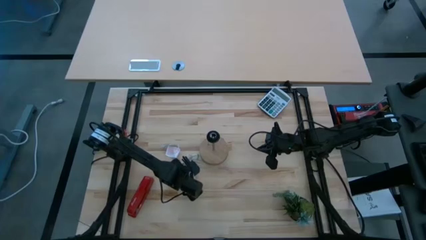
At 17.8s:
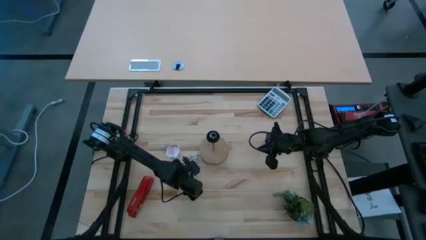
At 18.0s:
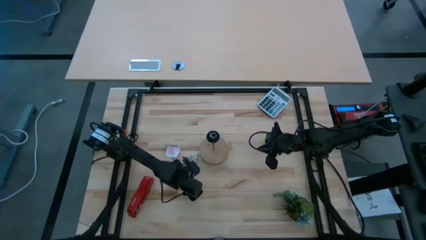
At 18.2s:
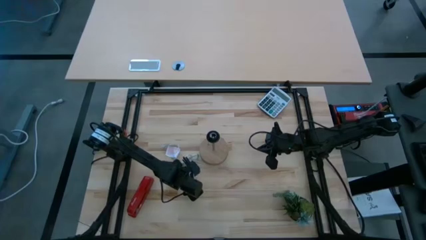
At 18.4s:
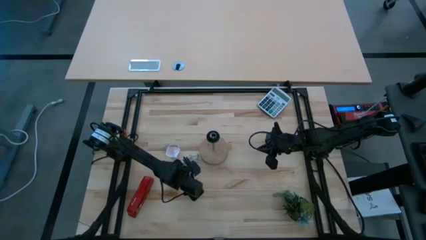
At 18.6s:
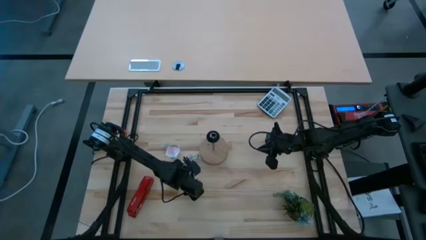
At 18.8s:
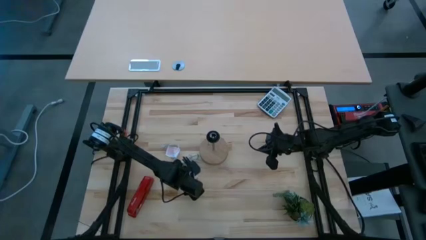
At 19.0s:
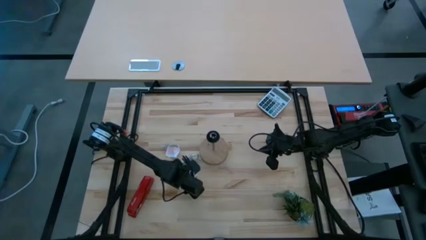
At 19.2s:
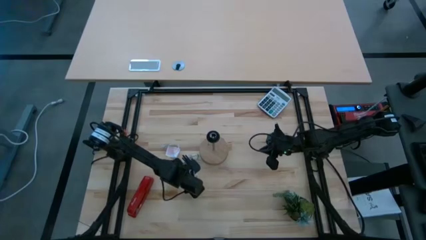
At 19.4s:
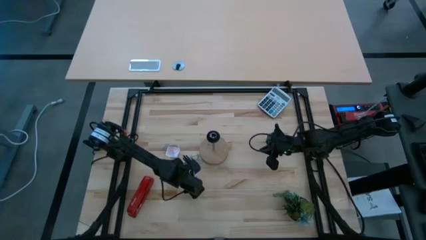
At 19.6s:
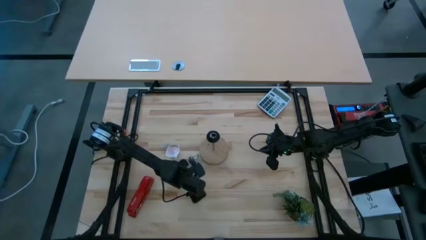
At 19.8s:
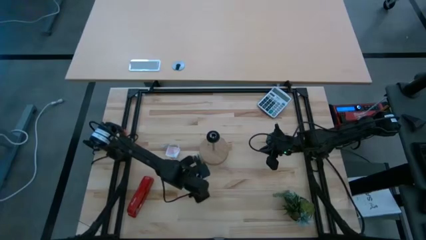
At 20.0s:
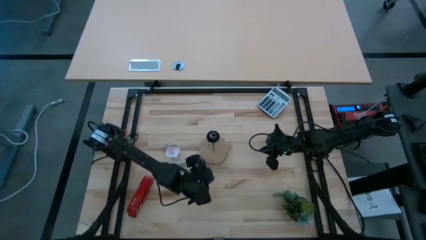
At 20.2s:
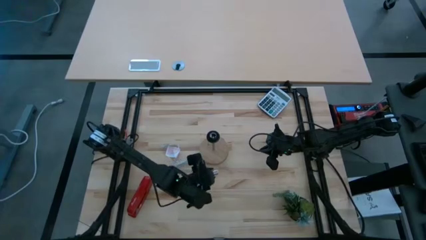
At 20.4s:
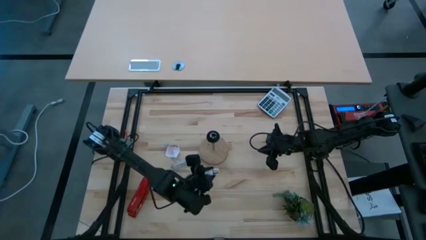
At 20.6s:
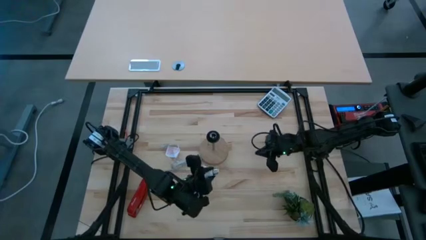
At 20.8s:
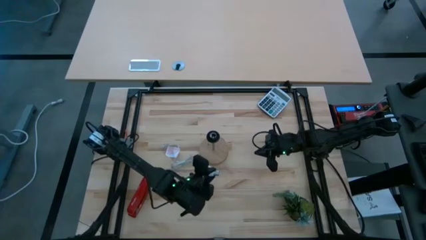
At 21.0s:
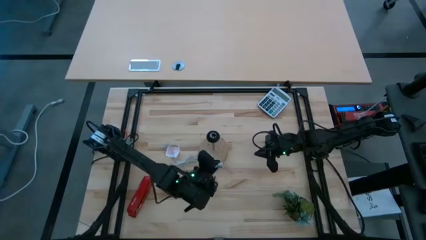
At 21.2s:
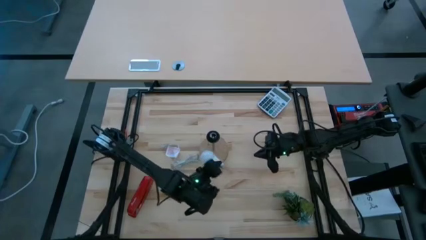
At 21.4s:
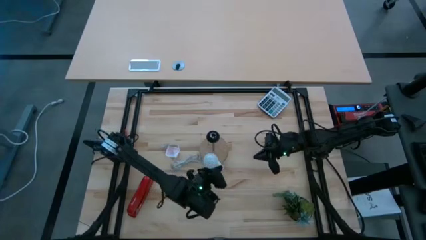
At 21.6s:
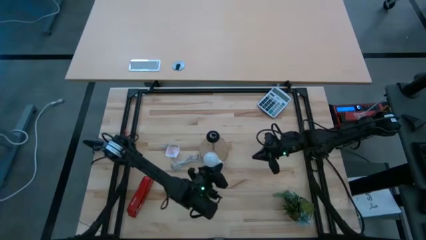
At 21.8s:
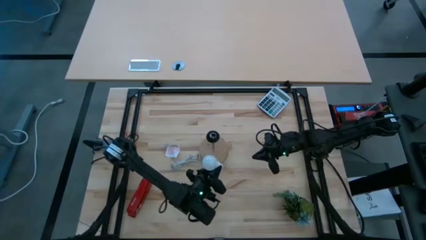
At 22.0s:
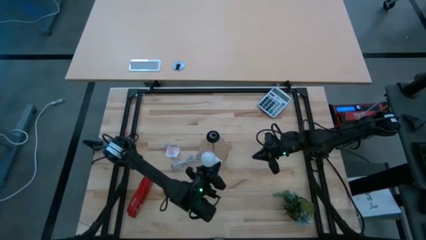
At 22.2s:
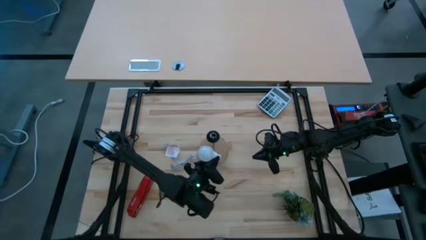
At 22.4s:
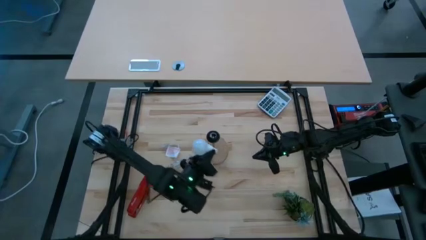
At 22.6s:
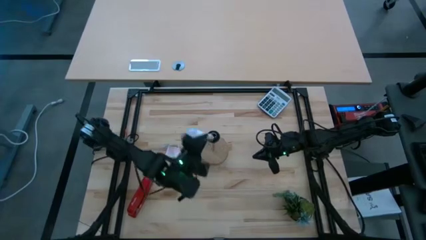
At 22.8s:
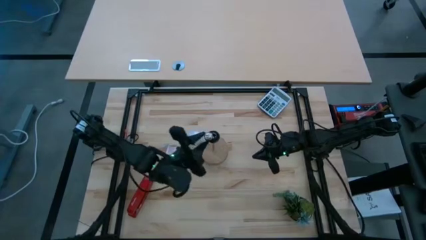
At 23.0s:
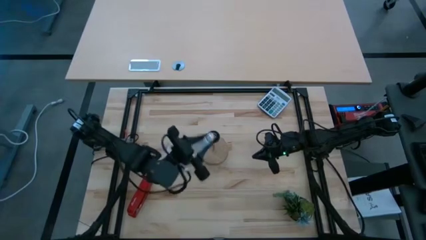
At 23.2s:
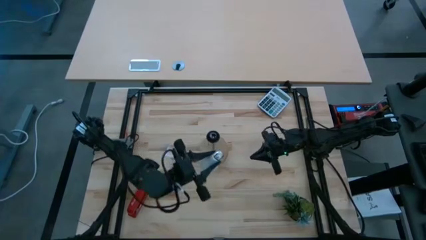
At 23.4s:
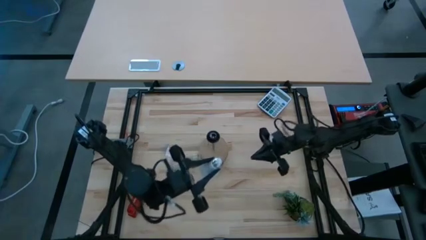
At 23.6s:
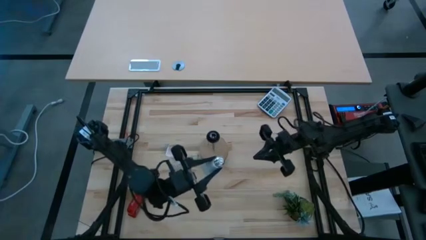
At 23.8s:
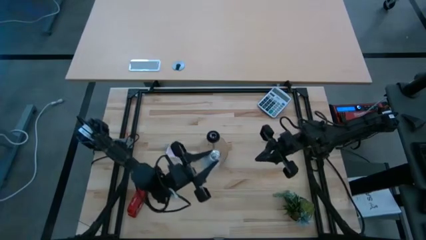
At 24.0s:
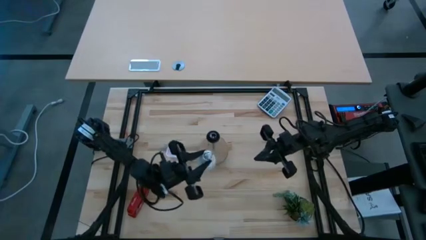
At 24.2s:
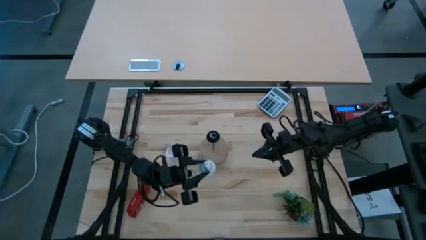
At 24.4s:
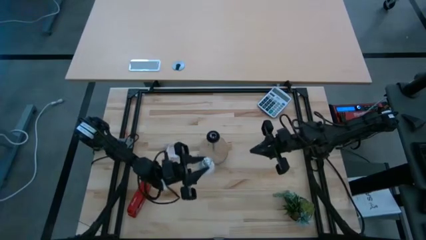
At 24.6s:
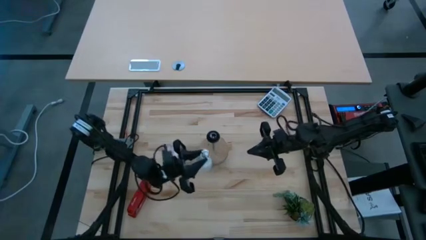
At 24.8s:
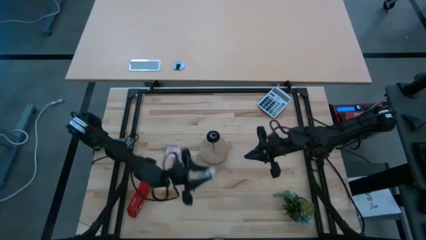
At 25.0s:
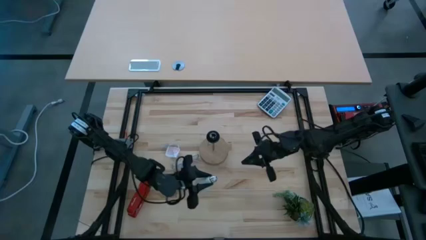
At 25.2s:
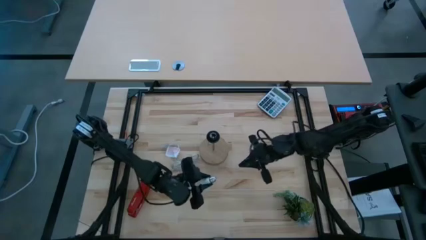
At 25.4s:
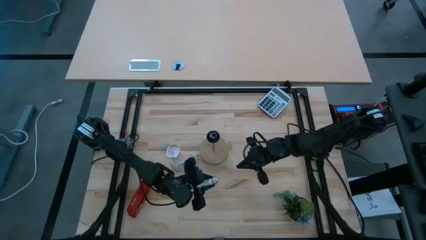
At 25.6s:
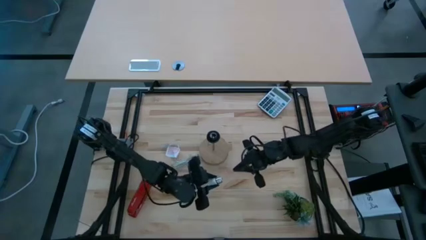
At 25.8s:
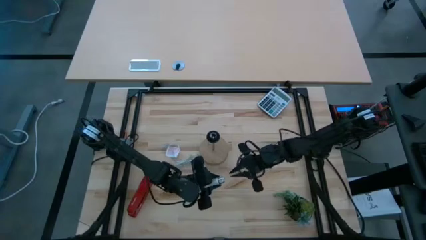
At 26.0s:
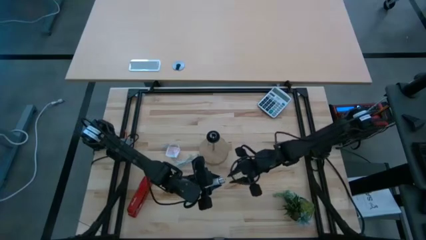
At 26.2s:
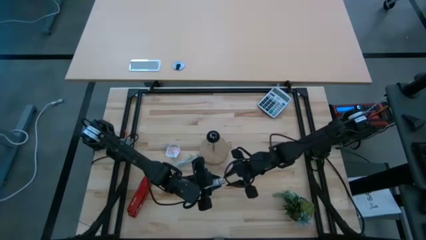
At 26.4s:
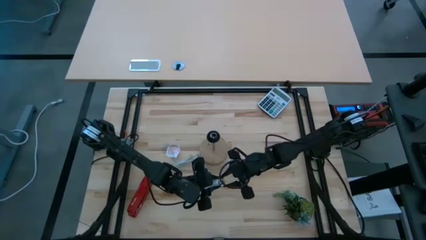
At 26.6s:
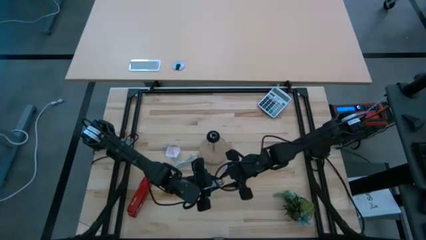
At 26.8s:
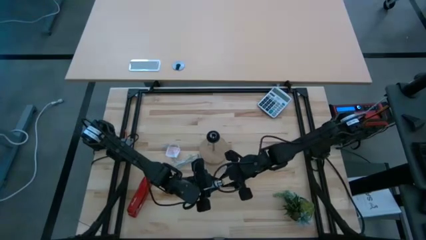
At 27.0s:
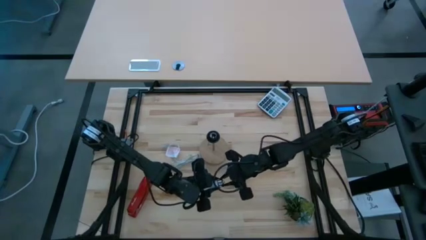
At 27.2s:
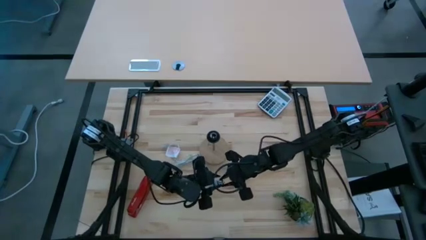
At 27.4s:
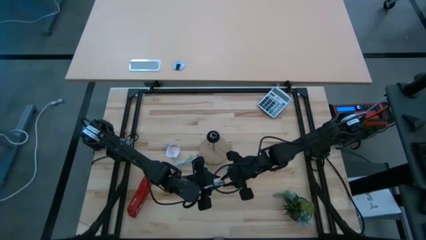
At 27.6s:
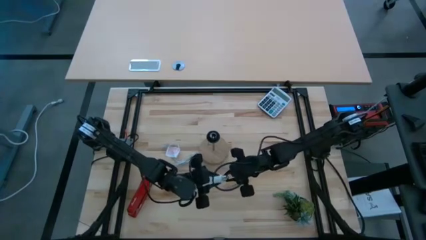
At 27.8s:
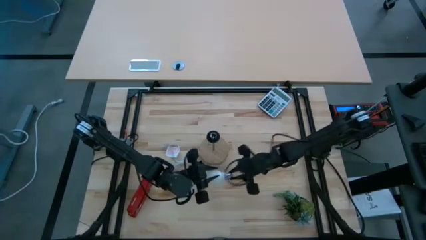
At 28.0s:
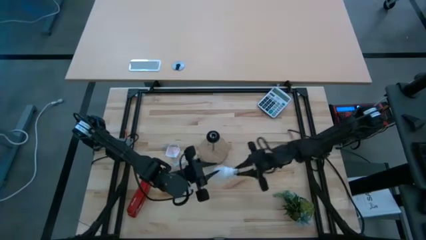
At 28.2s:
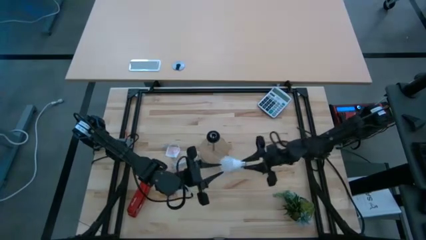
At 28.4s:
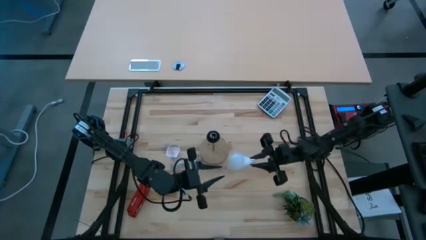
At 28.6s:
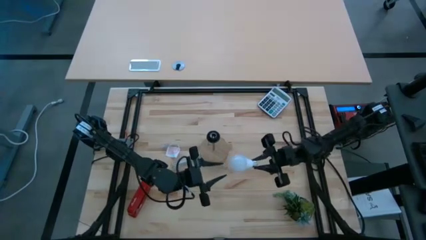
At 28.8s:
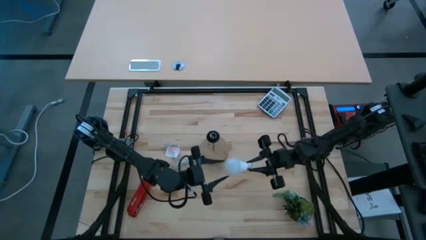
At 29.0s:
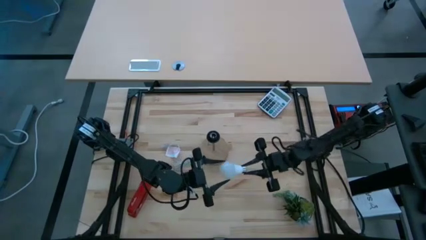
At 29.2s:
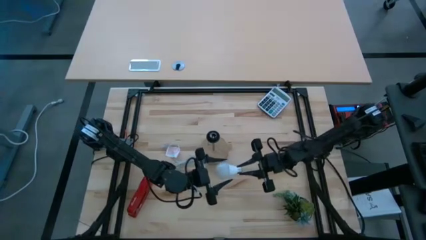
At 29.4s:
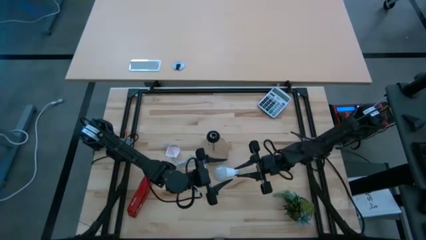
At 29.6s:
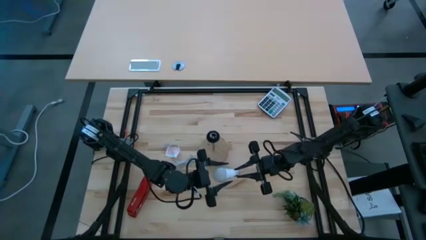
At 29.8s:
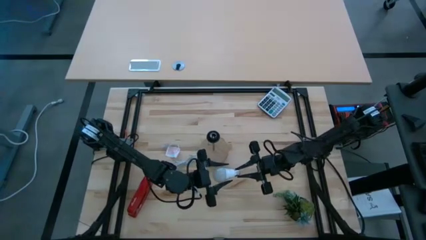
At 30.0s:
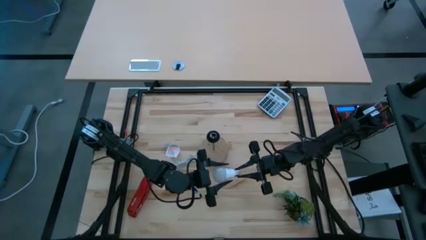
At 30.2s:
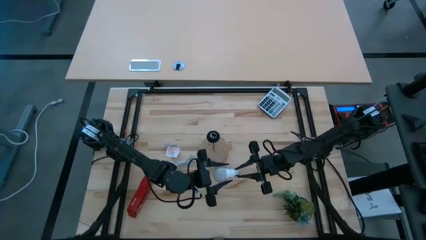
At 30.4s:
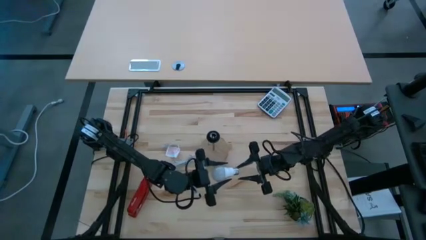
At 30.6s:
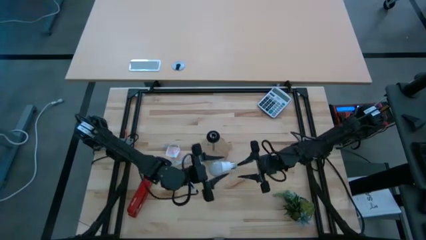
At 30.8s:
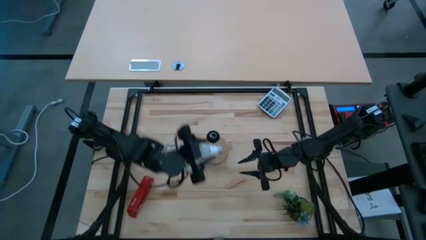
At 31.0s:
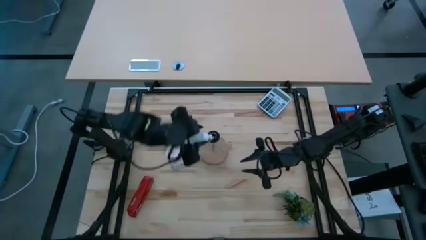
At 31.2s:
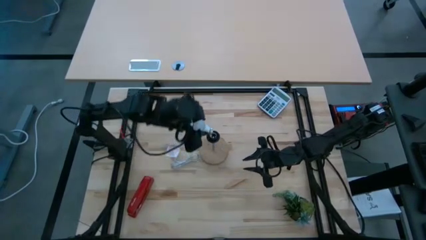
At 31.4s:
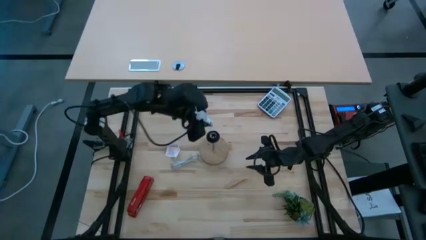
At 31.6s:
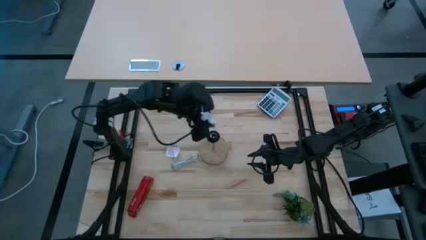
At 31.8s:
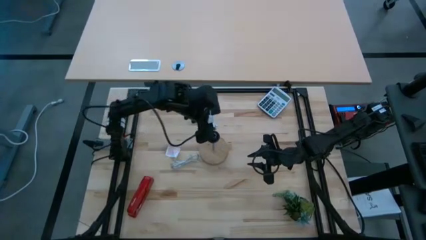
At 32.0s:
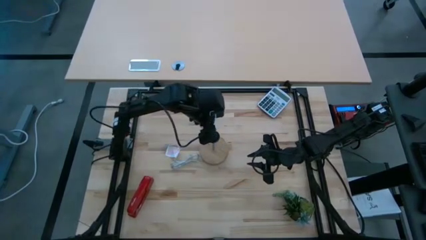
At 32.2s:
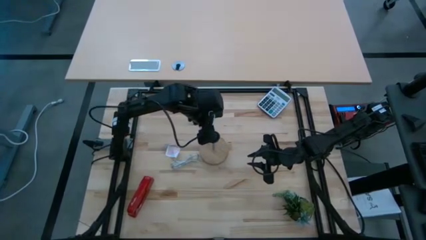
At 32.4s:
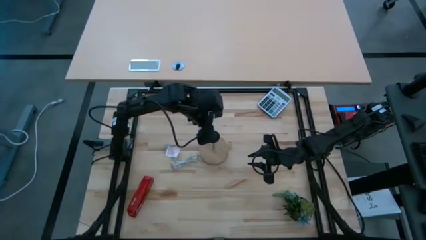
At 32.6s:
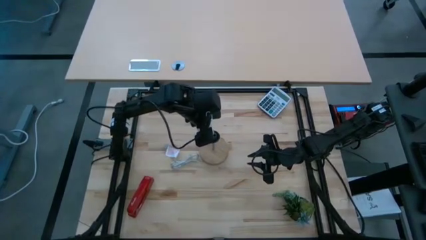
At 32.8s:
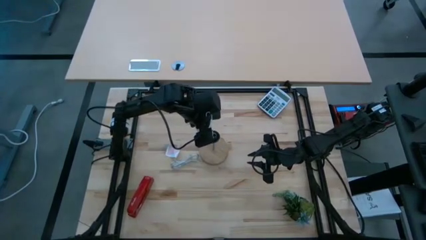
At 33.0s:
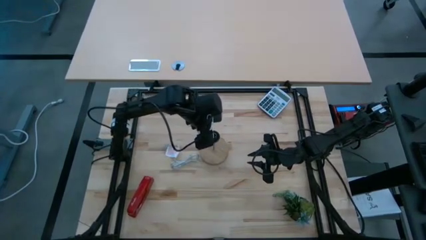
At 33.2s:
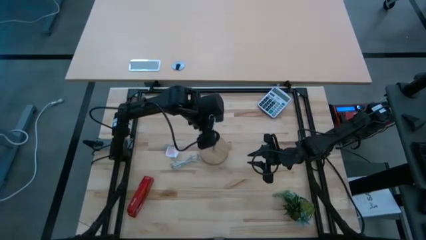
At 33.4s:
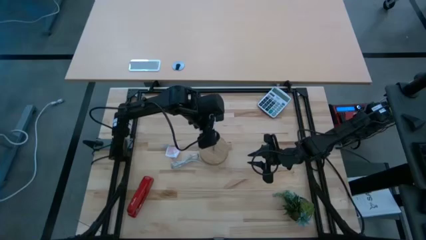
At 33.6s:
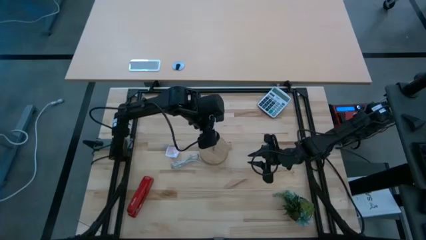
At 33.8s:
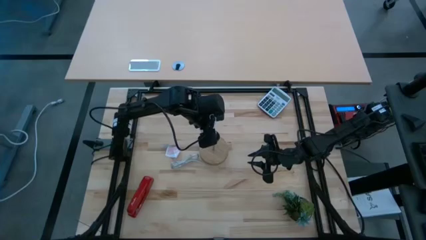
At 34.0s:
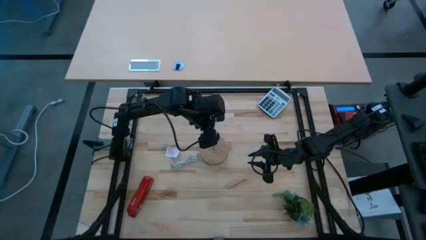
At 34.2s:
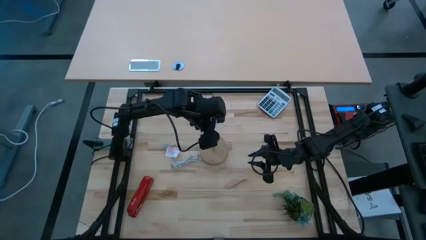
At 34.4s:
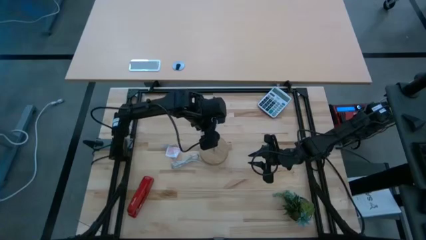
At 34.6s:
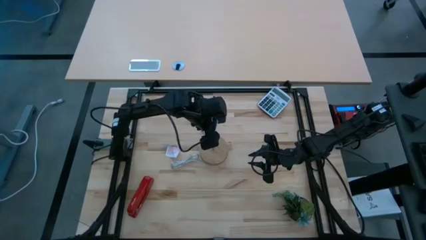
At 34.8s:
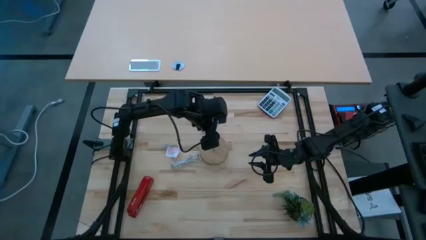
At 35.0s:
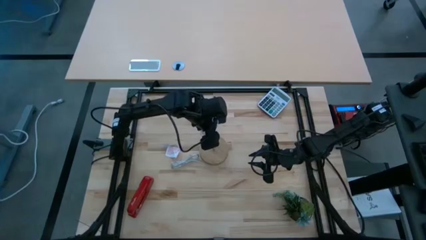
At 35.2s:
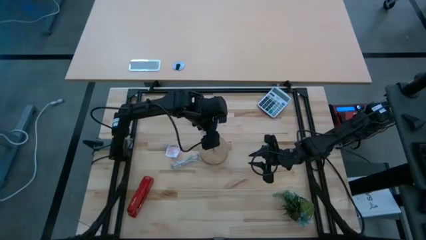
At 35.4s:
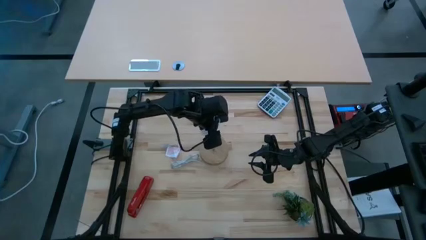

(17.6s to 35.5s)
Task: Screw lightbulb
Insert the lightbulb into the brown lamp
